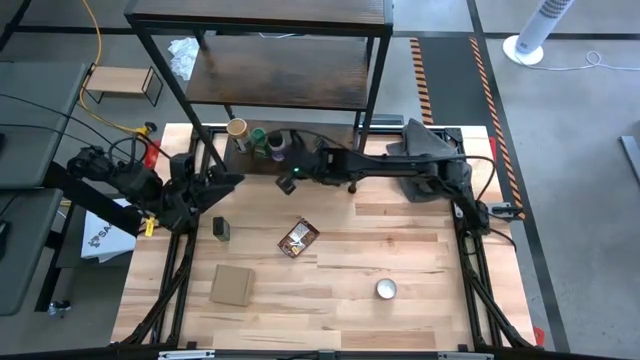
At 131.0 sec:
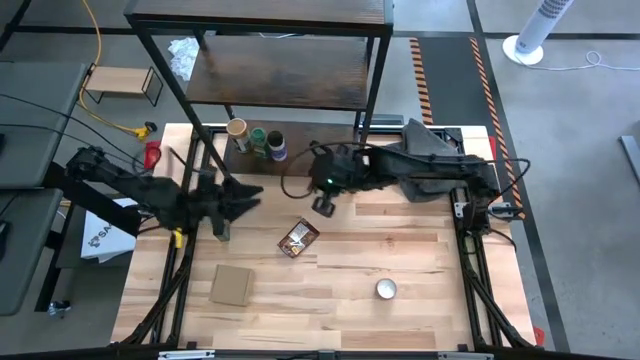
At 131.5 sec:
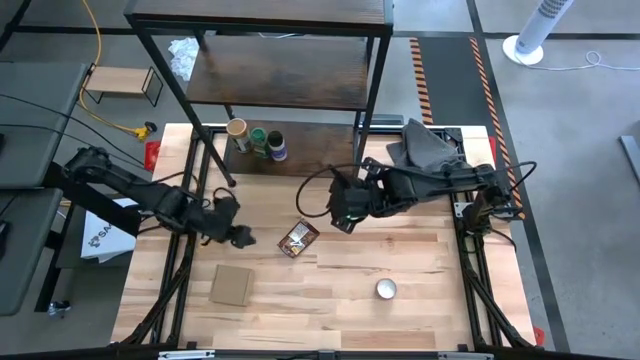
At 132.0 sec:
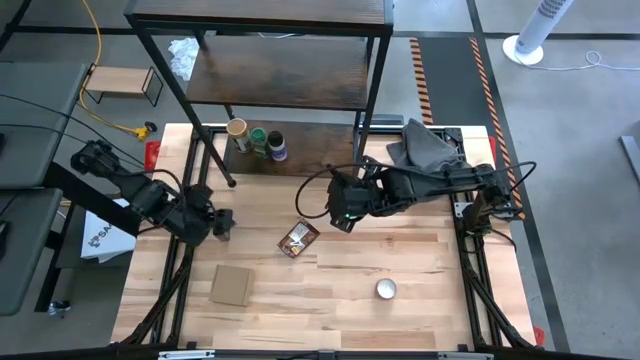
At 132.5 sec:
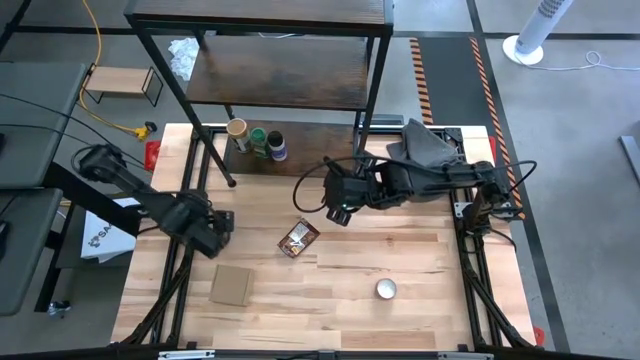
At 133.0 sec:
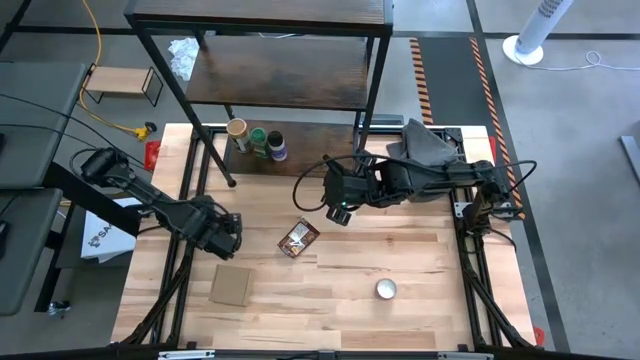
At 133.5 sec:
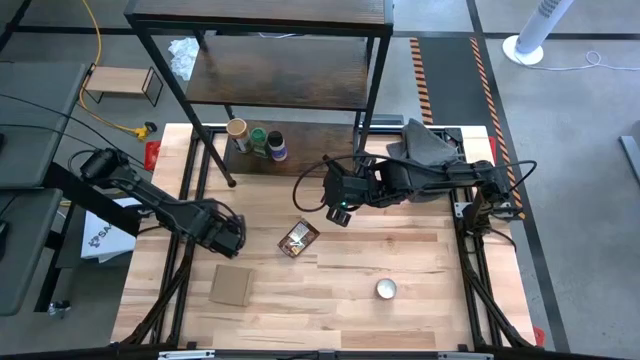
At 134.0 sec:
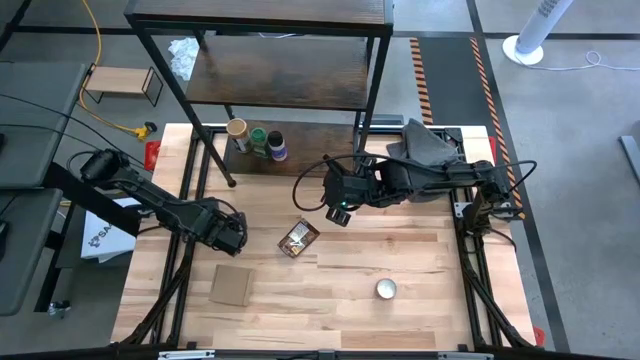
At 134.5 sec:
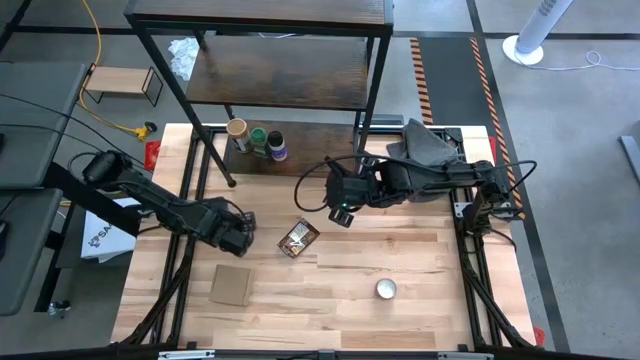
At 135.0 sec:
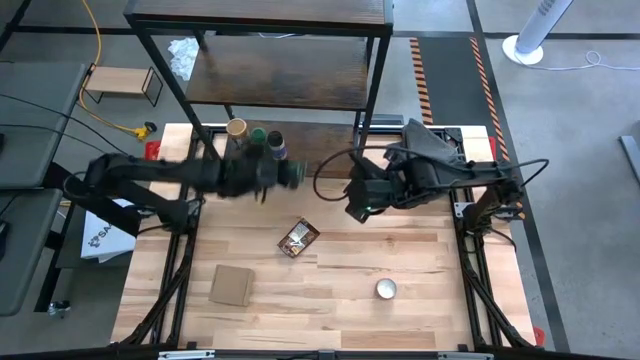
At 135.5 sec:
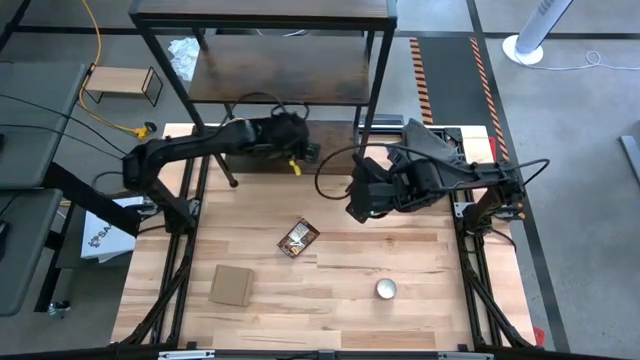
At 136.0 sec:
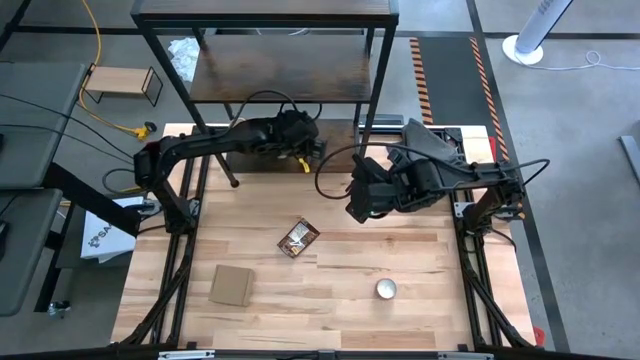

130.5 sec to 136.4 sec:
Task: Shelf spices
Put the black seasoning can on the shelf

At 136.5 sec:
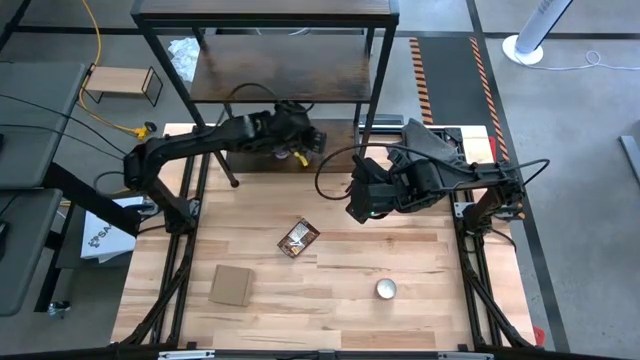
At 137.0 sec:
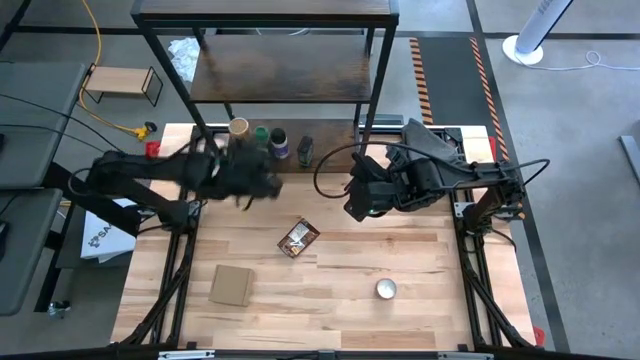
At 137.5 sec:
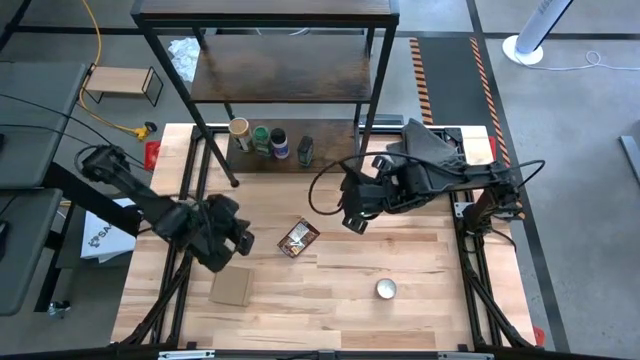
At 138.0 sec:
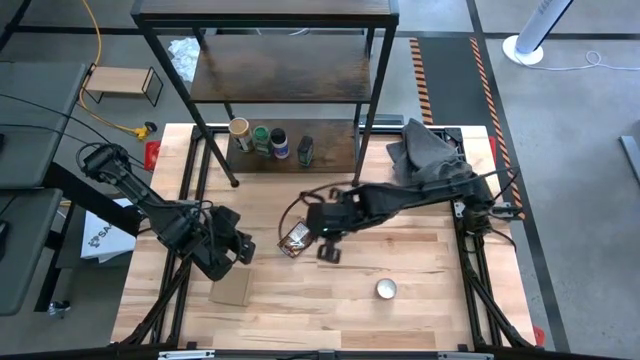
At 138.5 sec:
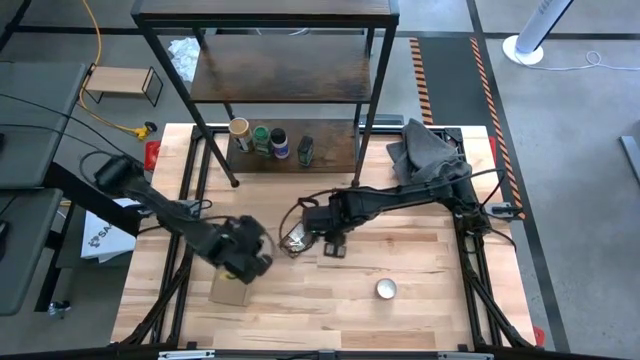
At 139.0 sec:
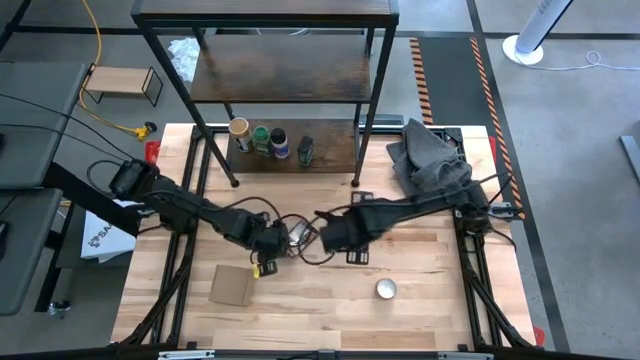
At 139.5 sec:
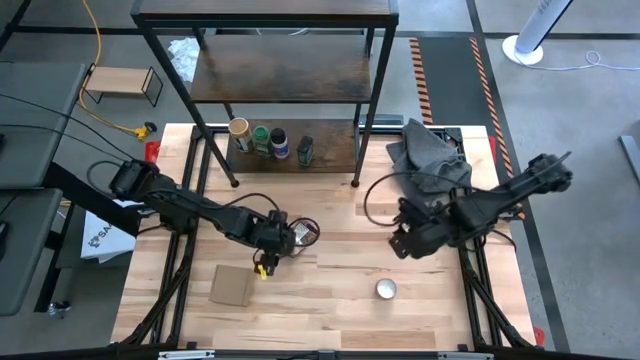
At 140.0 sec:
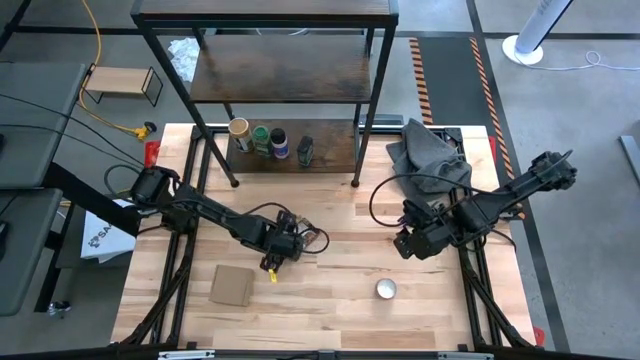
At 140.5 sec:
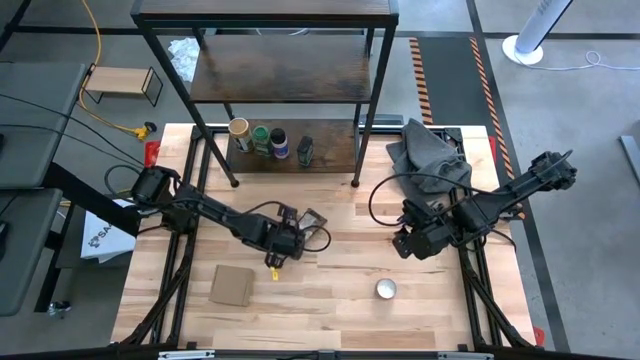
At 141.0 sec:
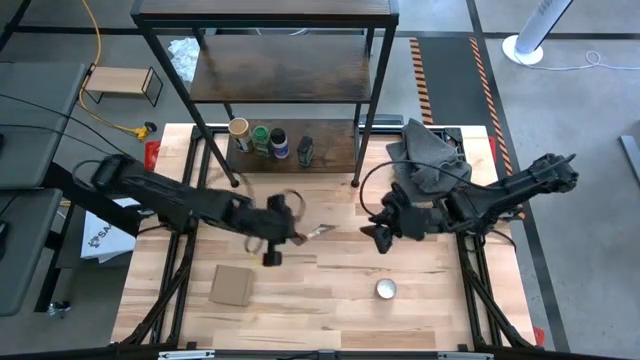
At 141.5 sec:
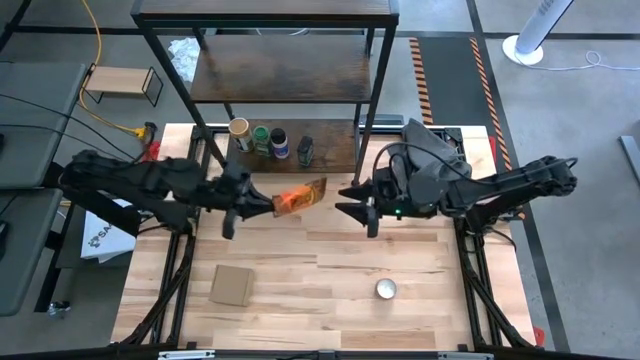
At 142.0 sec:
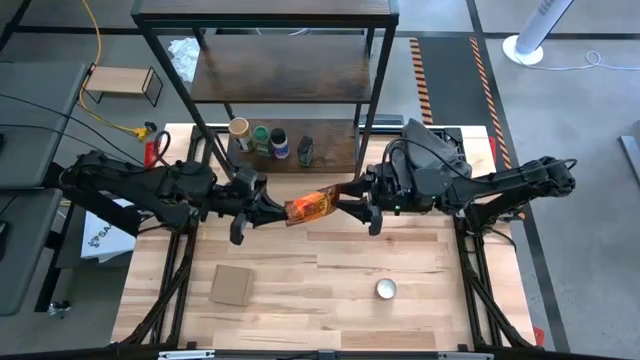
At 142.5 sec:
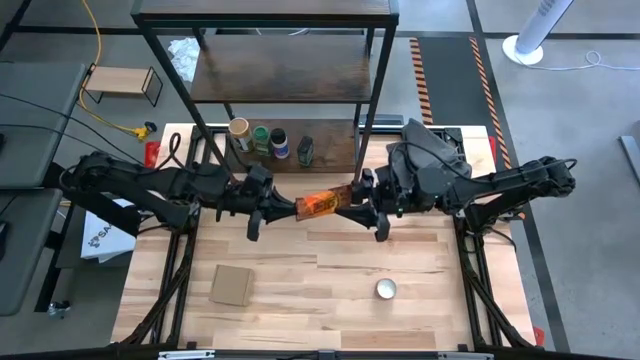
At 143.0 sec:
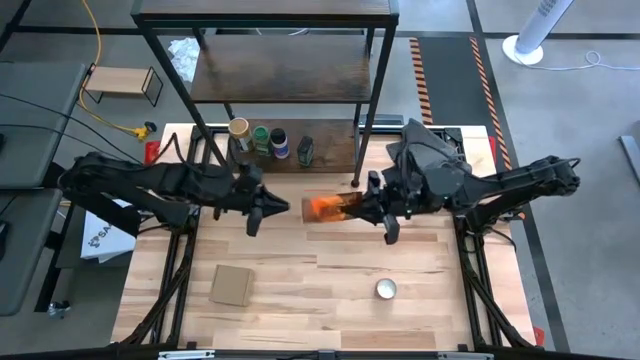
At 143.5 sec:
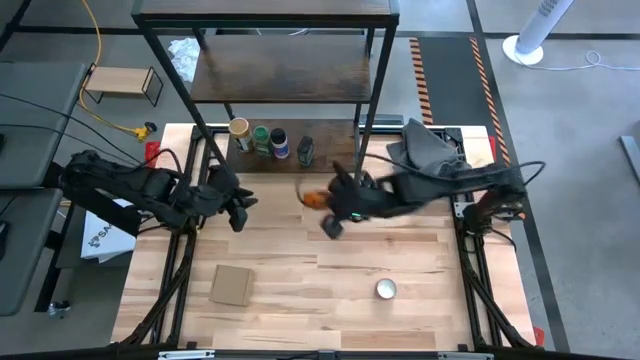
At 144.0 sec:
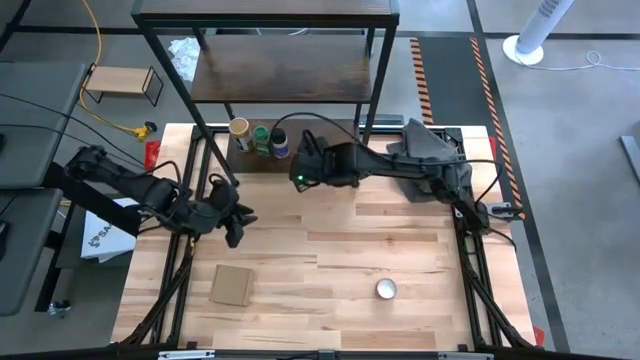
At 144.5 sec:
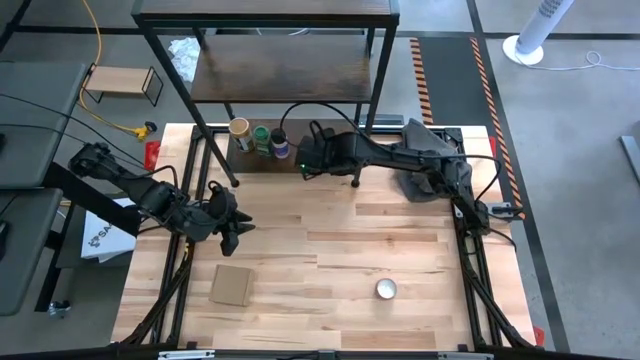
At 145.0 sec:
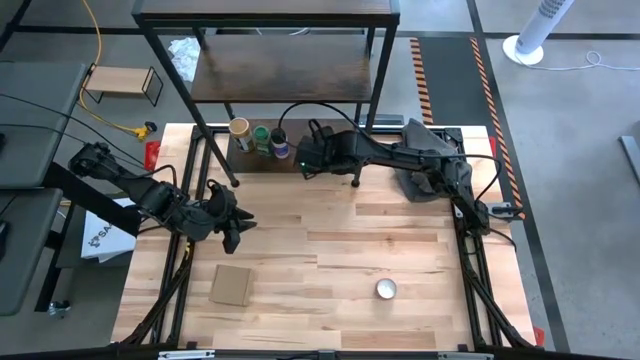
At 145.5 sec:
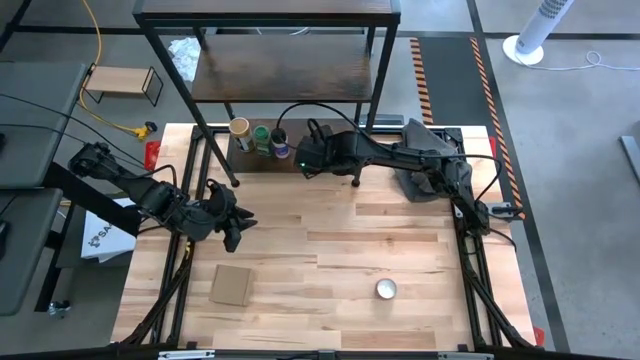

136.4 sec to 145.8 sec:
Put the orange seasoning pack on the shelf

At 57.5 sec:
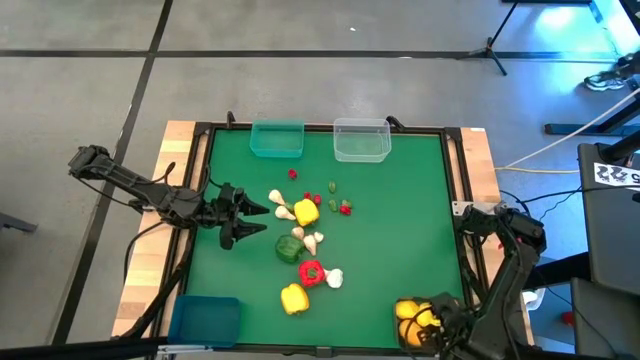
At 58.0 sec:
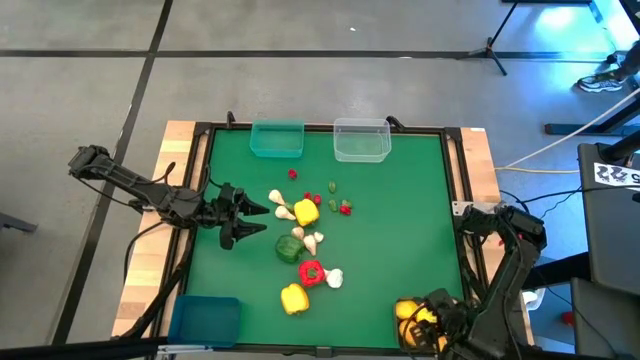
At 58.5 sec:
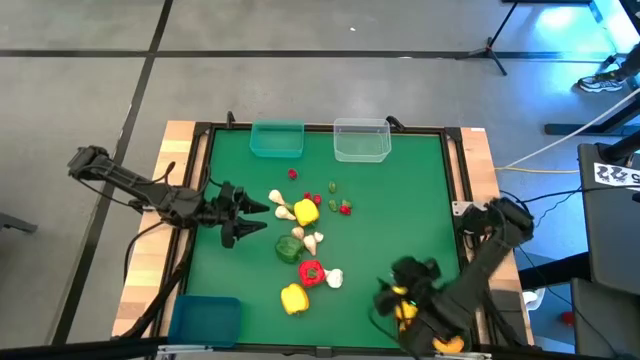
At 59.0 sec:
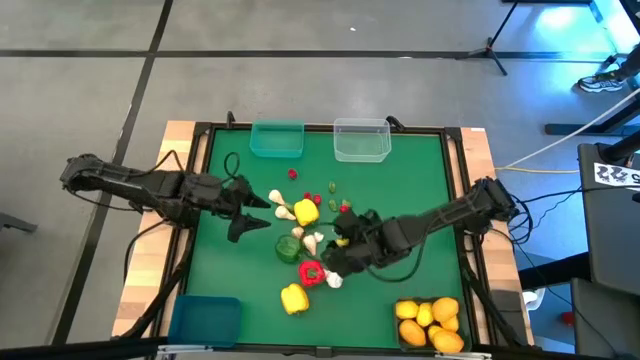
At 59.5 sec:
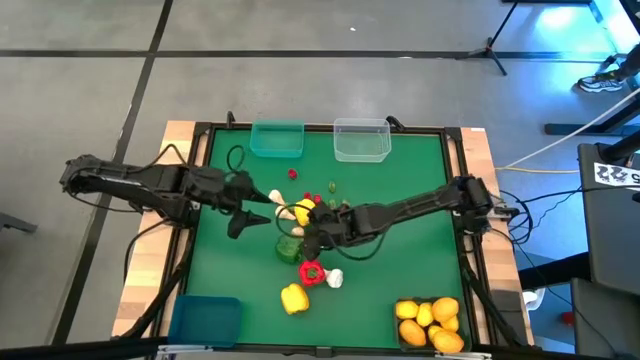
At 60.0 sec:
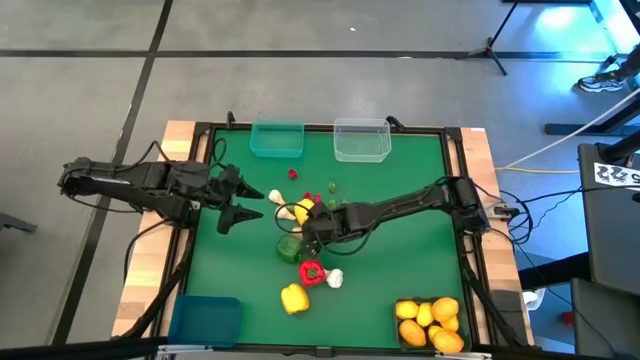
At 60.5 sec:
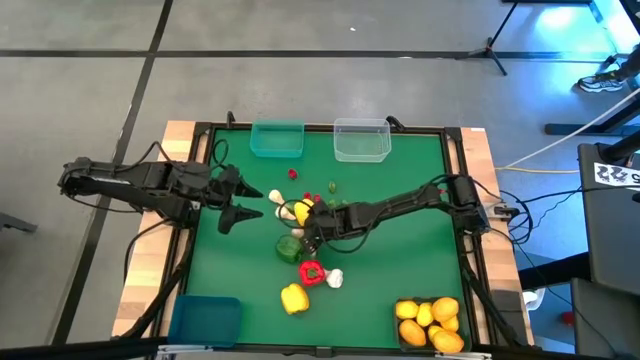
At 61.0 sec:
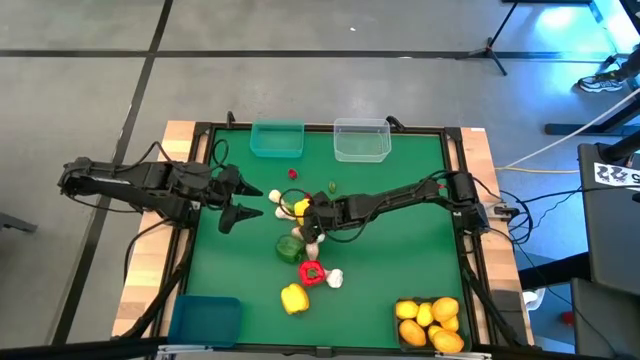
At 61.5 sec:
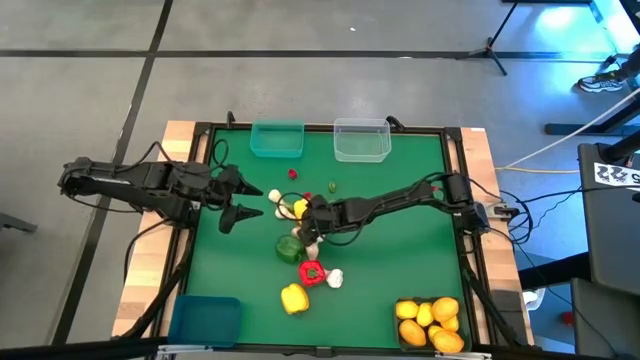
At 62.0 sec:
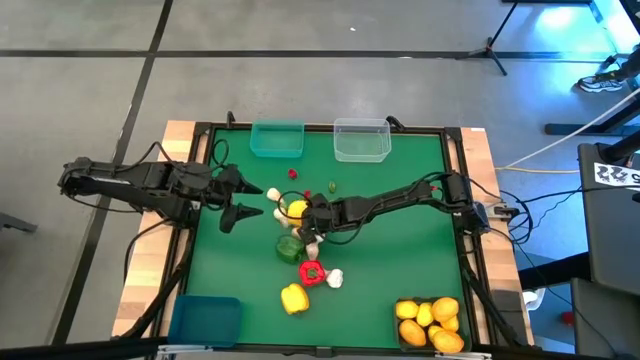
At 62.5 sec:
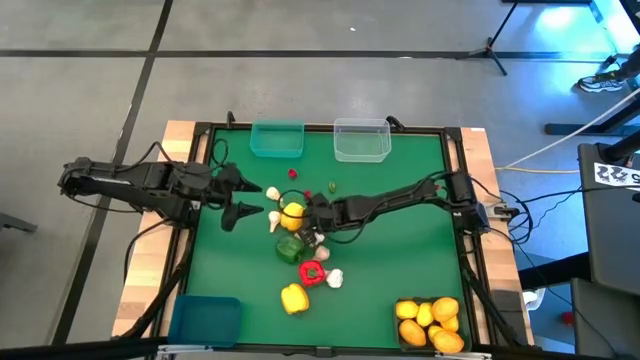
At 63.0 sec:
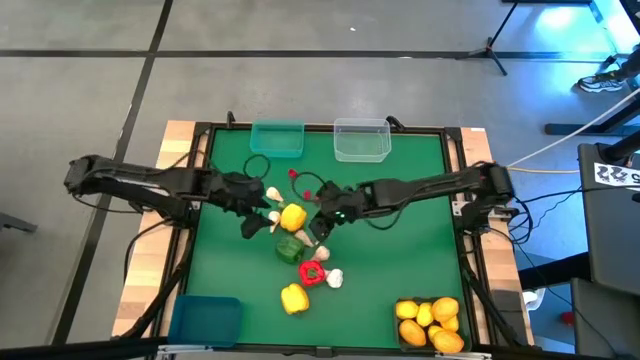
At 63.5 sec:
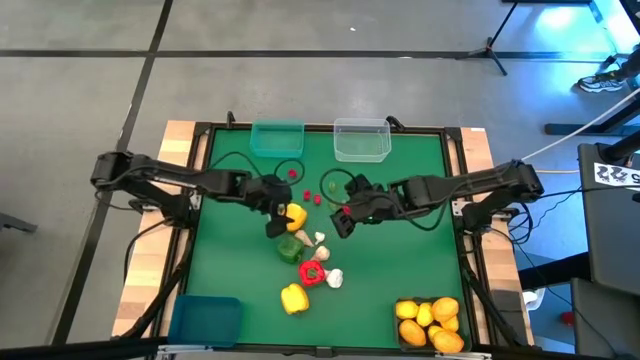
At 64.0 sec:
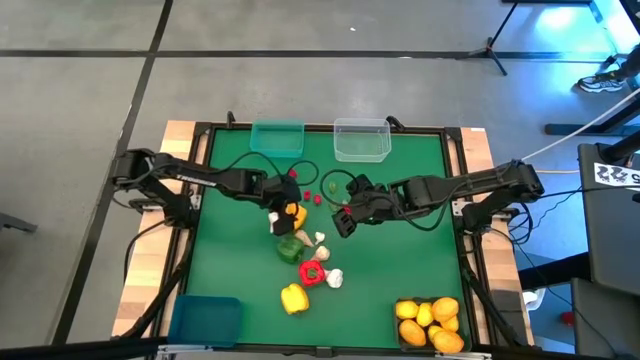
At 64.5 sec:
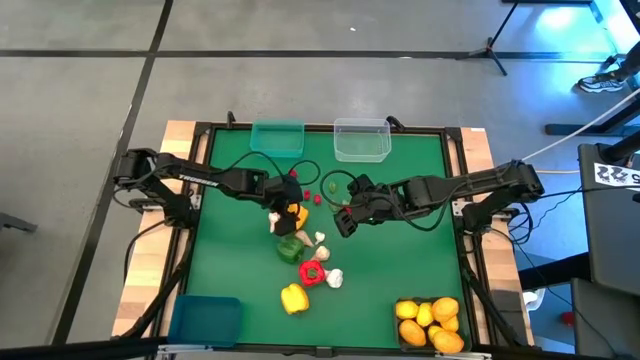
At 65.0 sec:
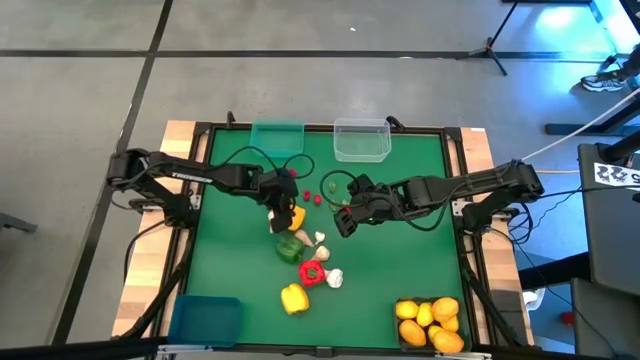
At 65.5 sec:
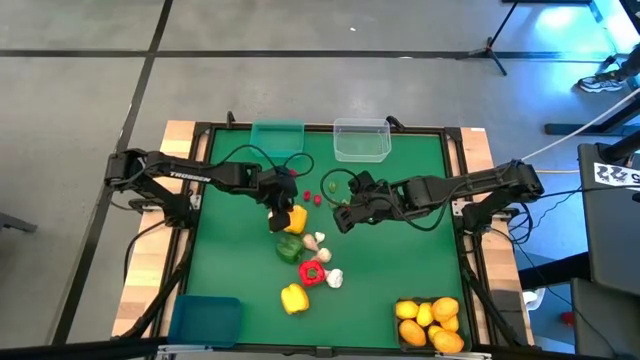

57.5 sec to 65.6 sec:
Task: Sort produce into baskets
Put the yellow bell pepper into the skyblue bin
